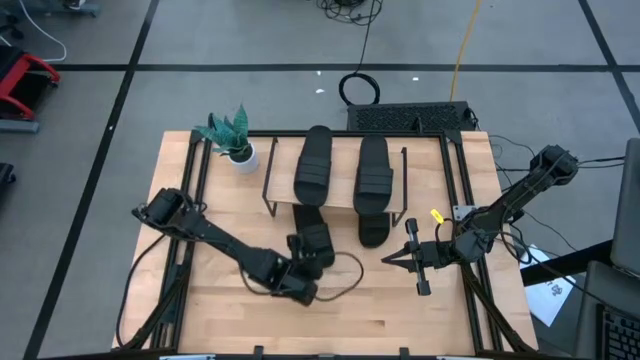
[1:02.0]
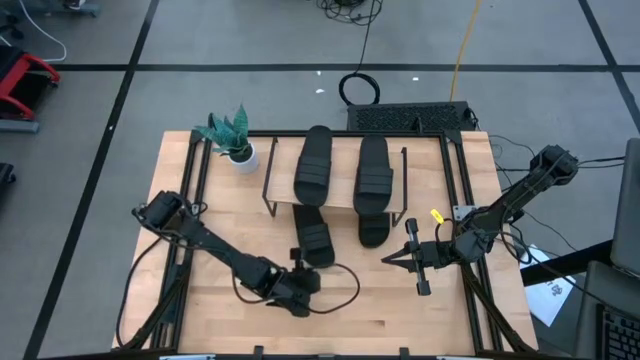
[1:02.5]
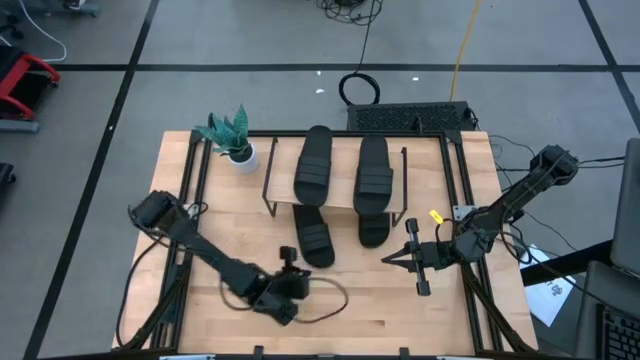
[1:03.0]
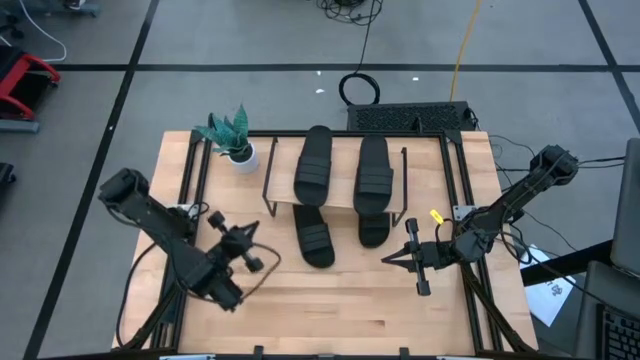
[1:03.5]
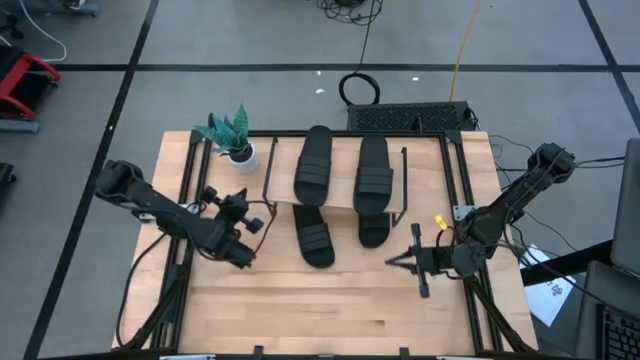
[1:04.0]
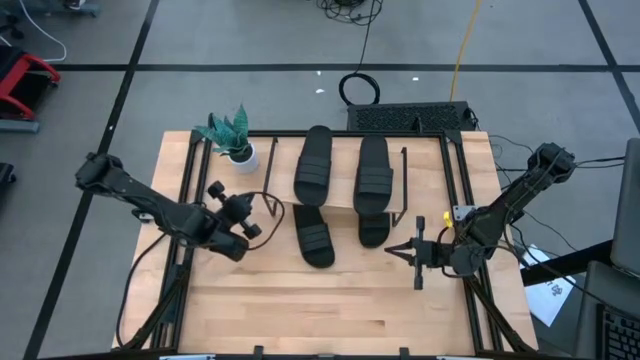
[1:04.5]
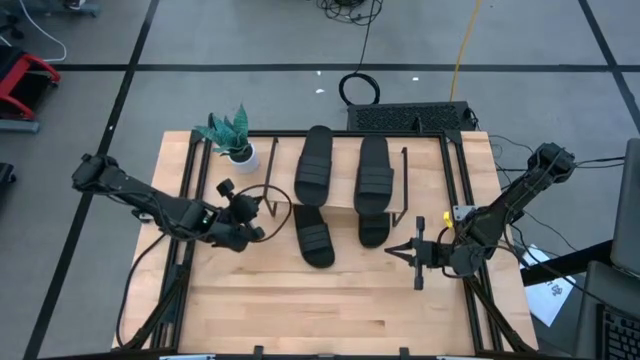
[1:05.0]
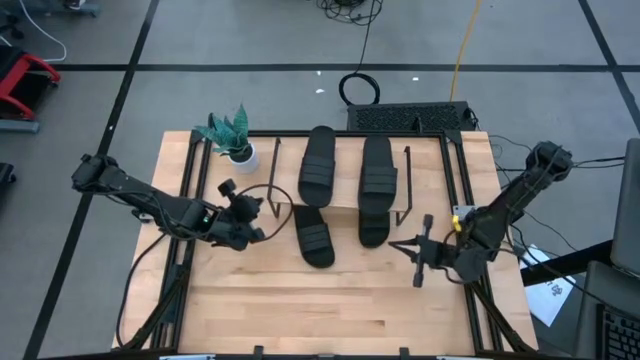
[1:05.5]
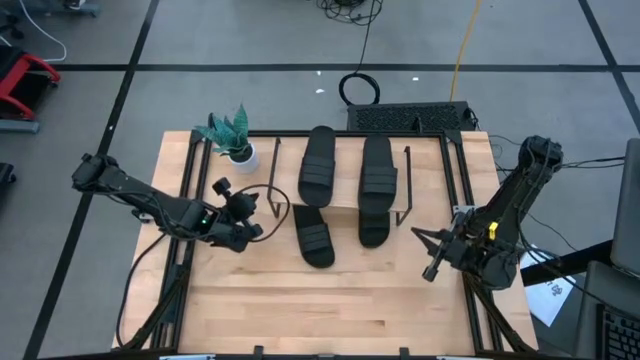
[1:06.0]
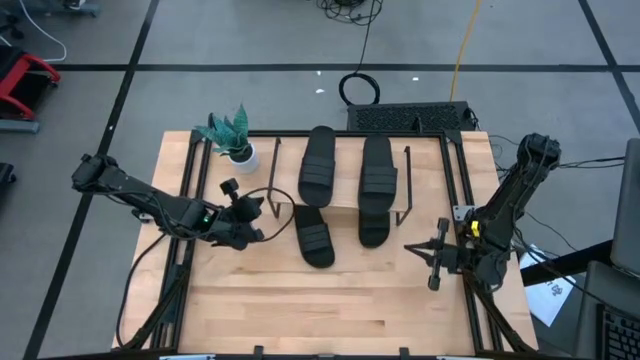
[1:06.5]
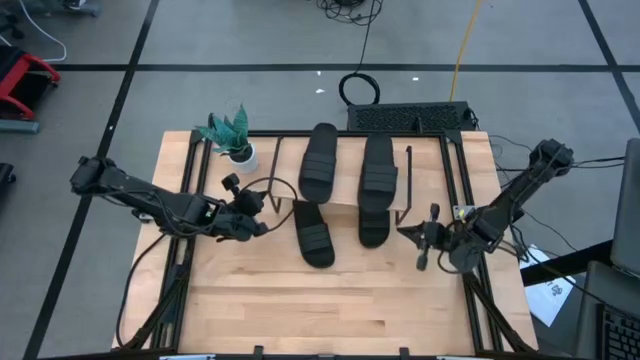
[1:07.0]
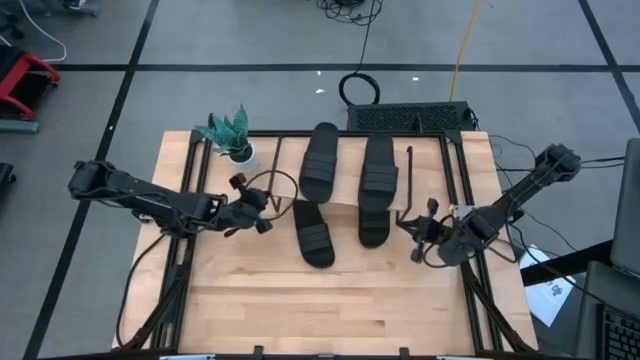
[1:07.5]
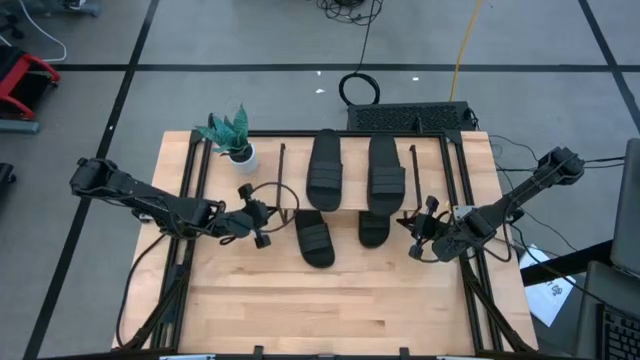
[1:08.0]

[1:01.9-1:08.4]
Task: Pick and place slides into the shelf
Adjust the shelf

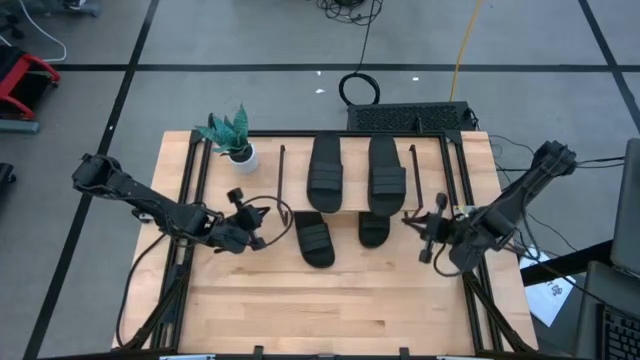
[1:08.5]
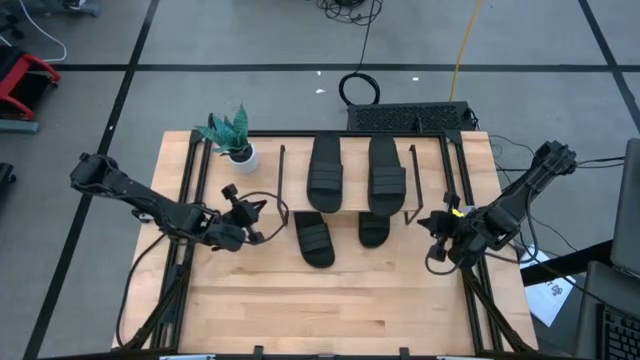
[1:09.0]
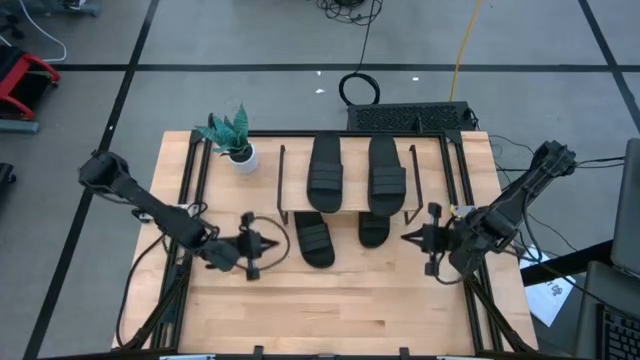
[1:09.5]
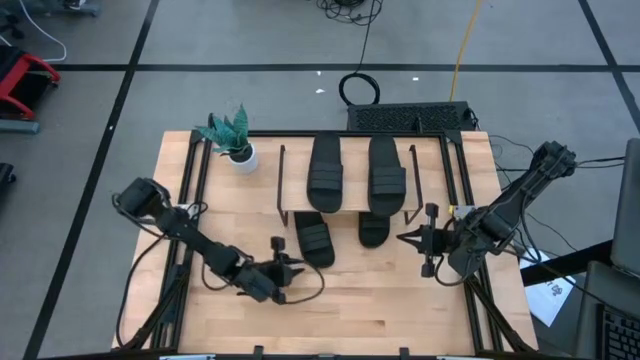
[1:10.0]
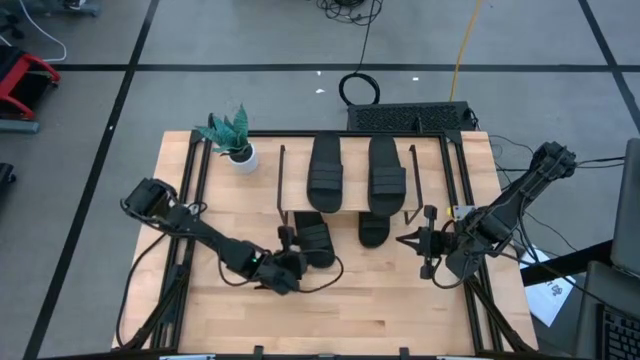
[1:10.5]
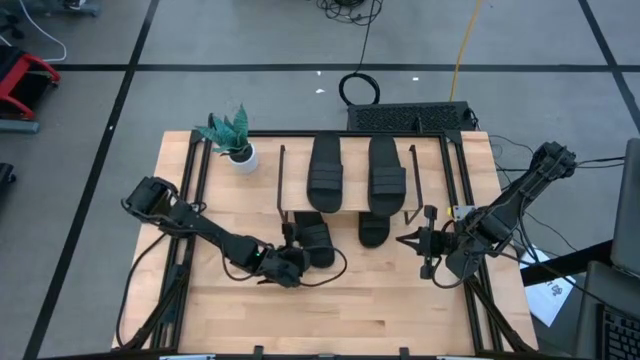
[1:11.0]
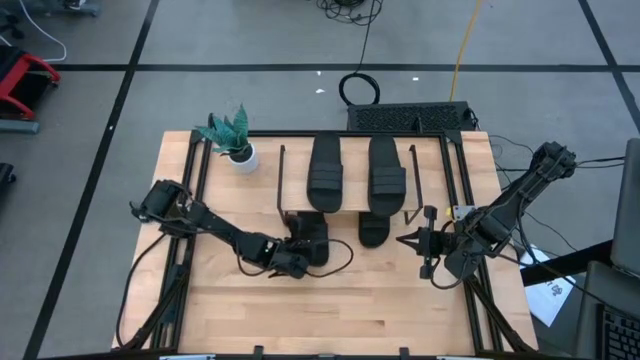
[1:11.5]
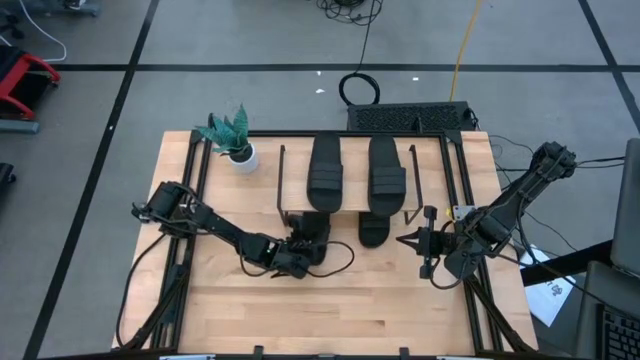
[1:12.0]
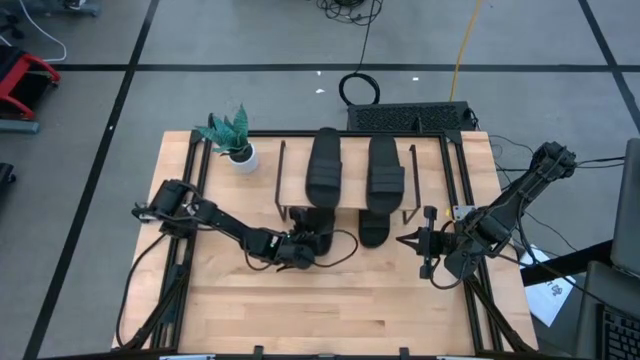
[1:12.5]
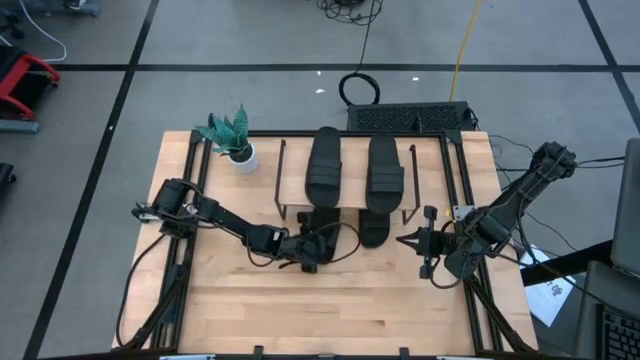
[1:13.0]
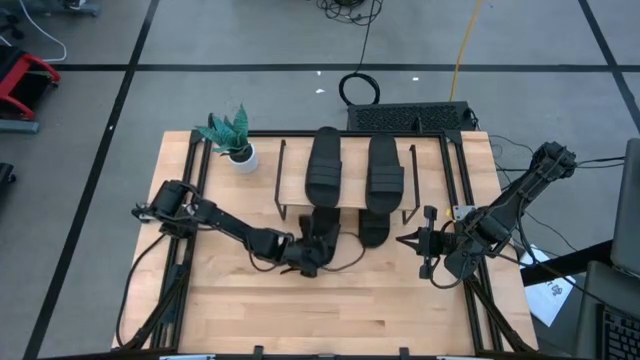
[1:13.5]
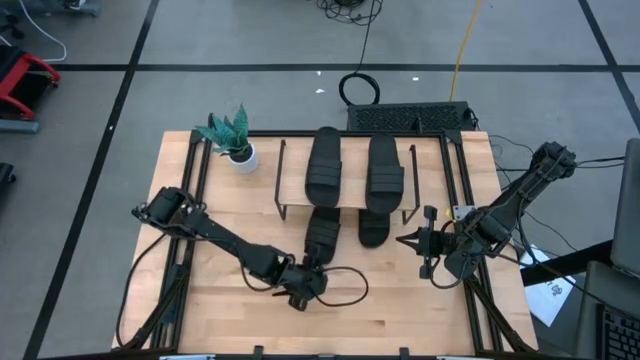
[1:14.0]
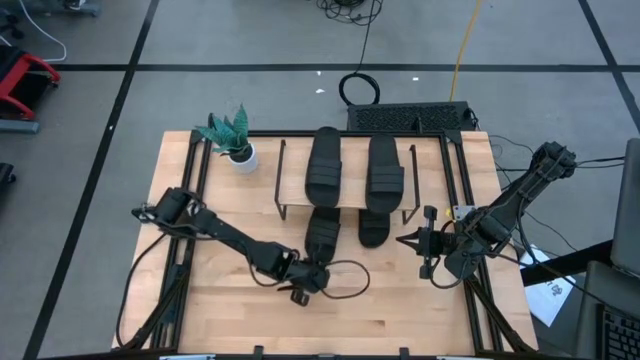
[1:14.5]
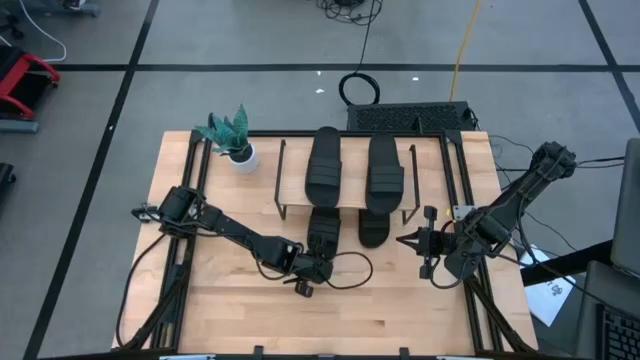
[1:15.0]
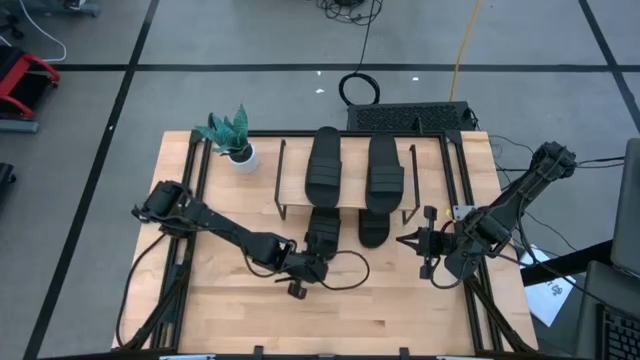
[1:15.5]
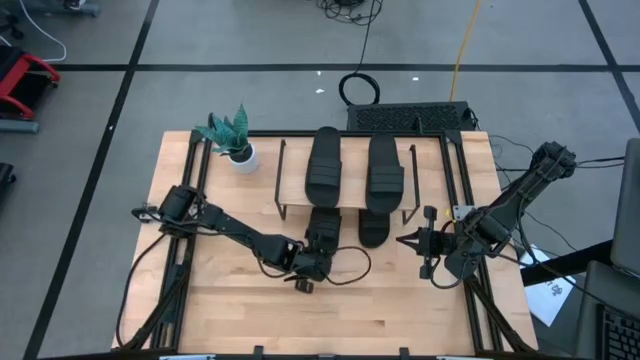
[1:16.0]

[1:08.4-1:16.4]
Adjust the black slipper under the shelf

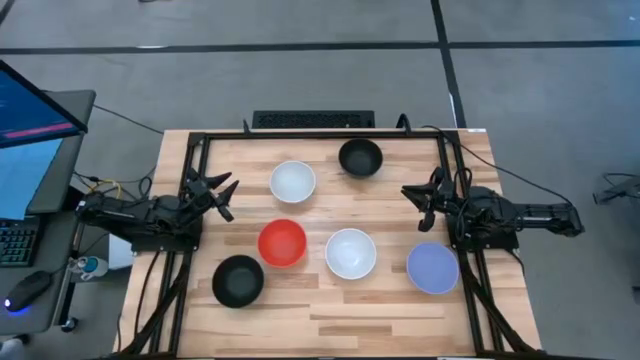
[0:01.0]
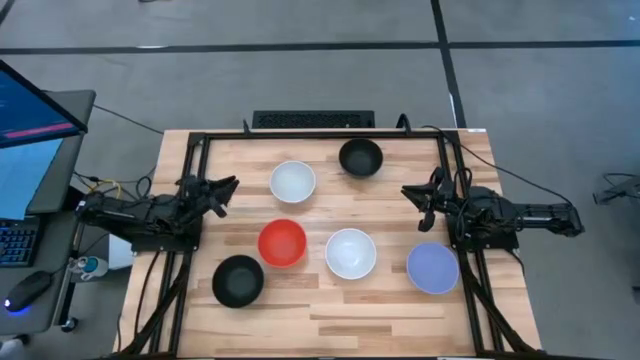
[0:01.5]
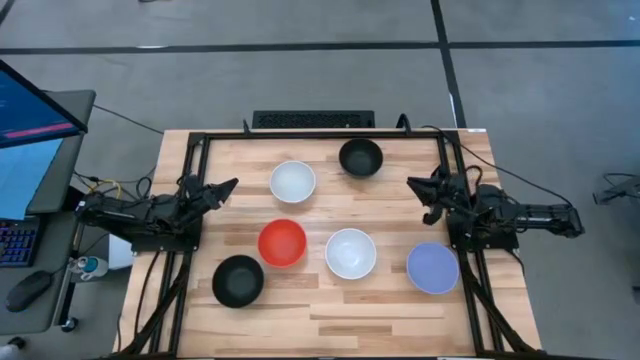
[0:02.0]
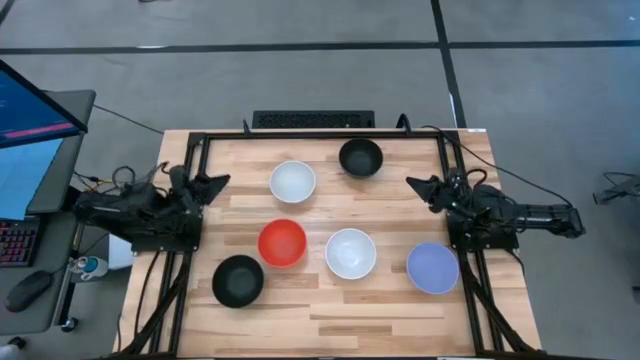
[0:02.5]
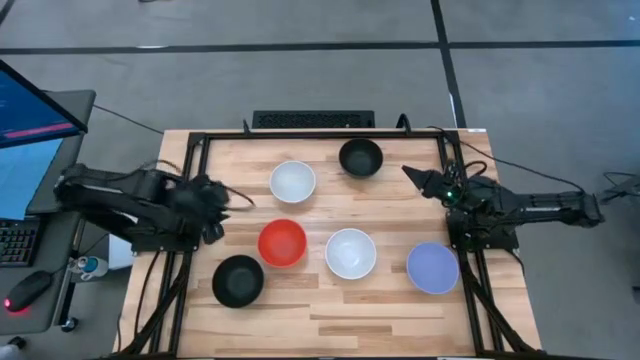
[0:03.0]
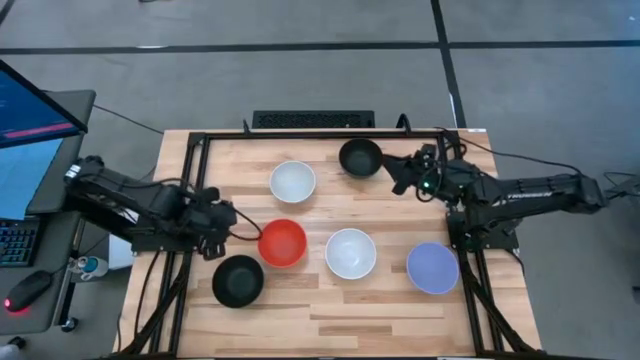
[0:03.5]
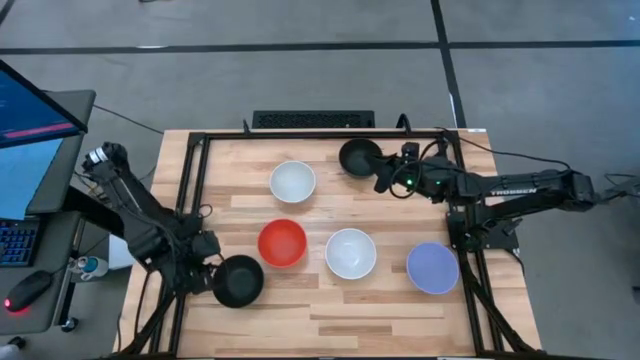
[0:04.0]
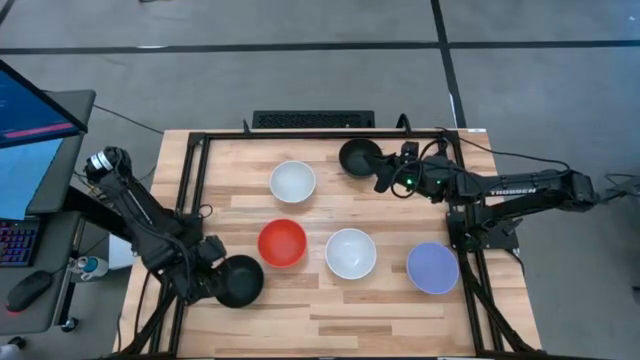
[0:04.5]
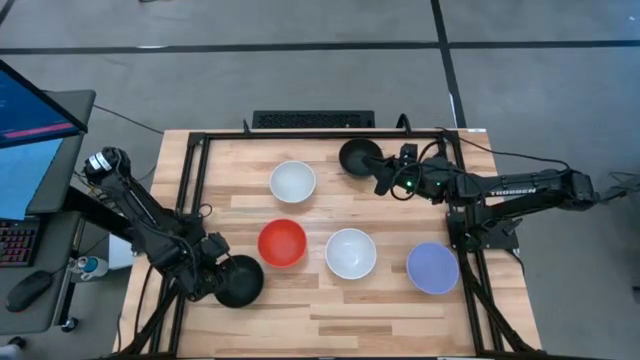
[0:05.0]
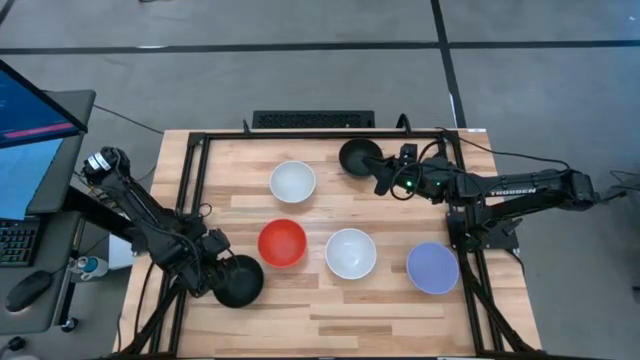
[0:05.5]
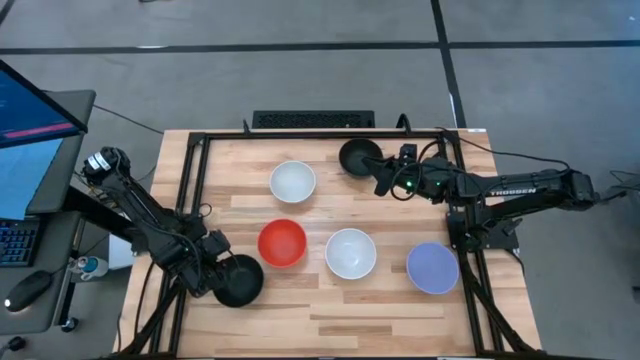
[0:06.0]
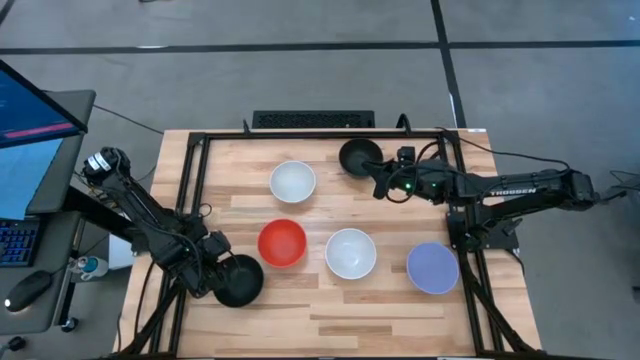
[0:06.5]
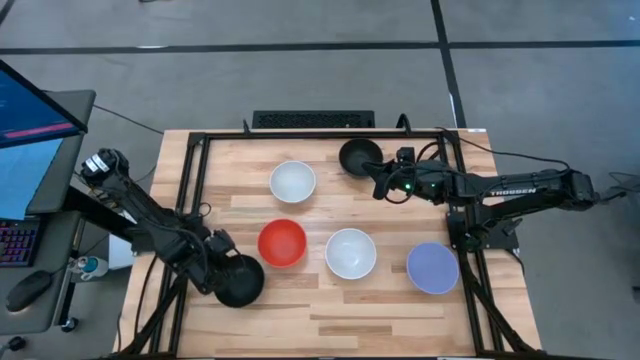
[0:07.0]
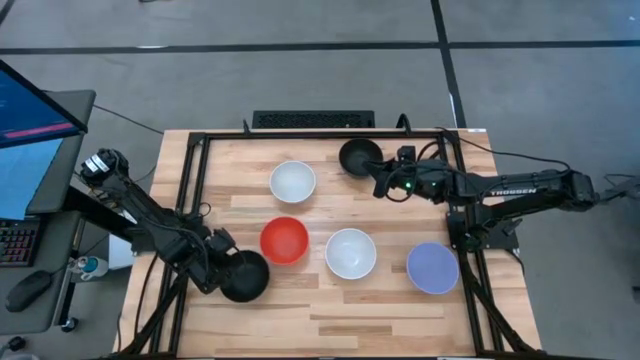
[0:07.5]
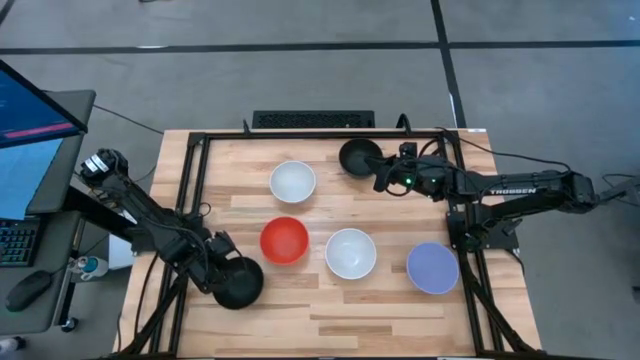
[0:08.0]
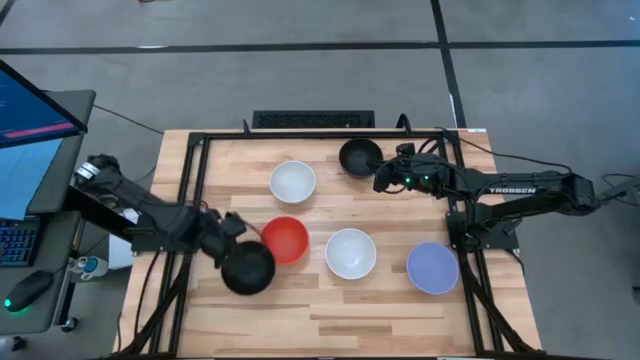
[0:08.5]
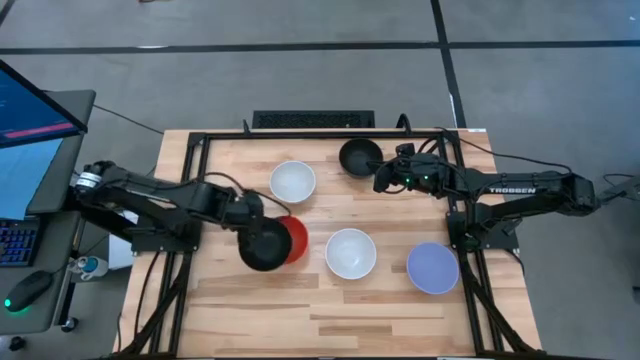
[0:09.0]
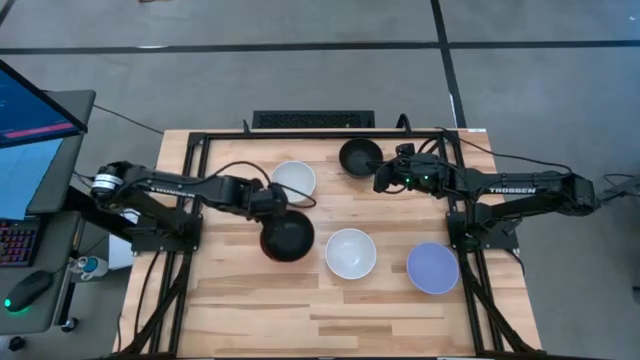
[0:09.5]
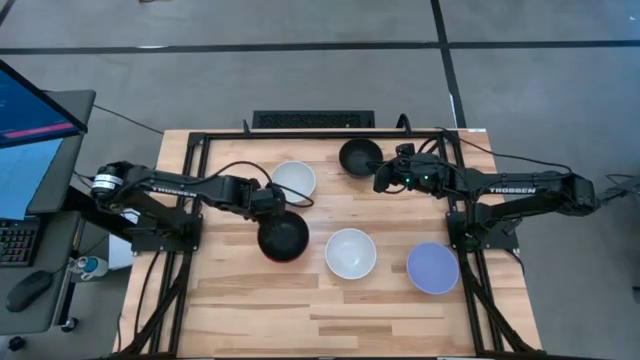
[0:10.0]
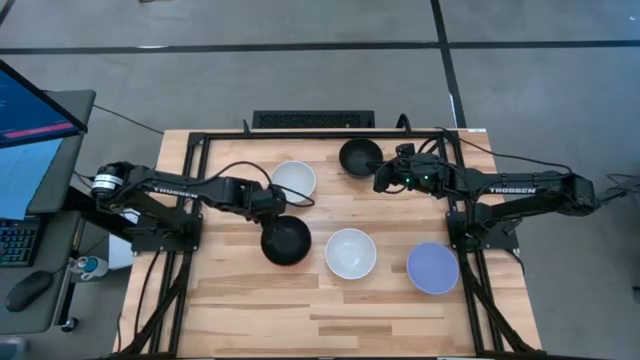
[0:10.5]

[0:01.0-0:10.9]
Task: Nest bowls inside each other
Stack the bottom black bowl on the orange bowl
